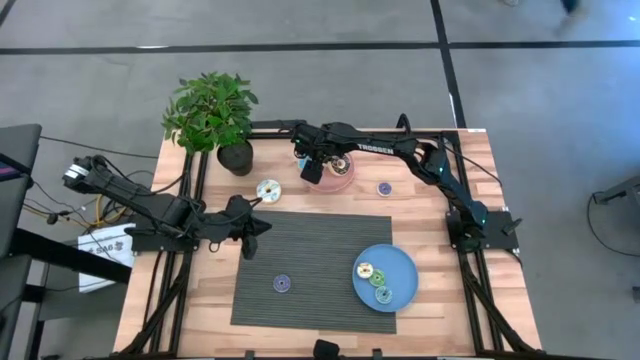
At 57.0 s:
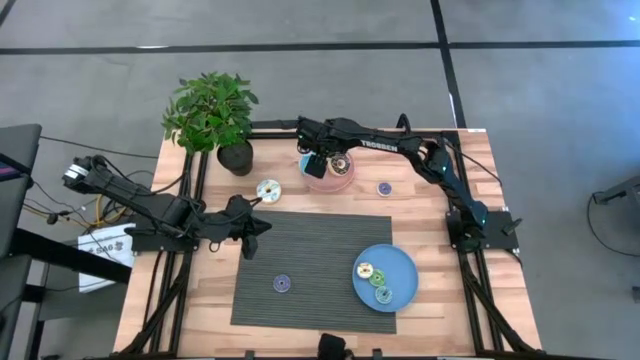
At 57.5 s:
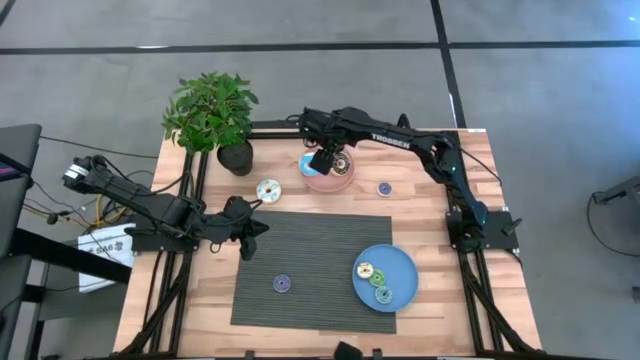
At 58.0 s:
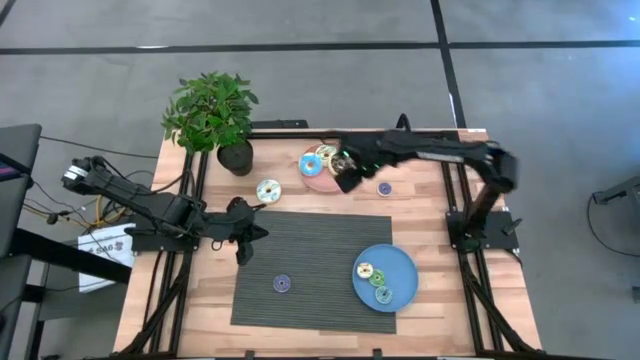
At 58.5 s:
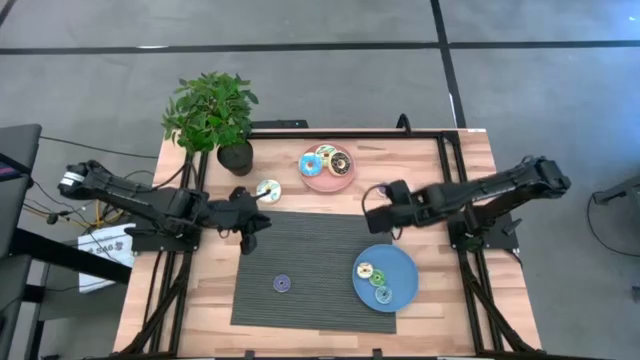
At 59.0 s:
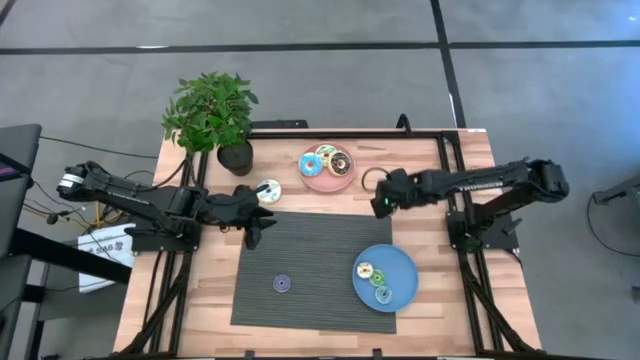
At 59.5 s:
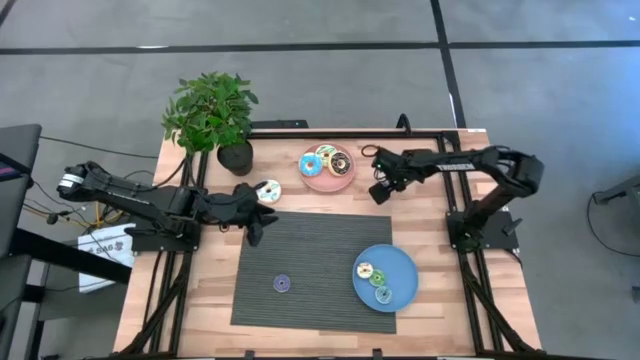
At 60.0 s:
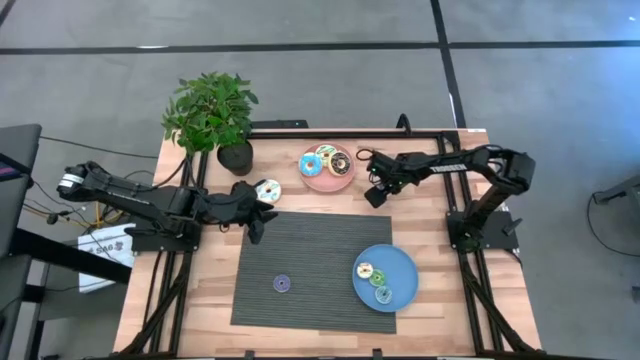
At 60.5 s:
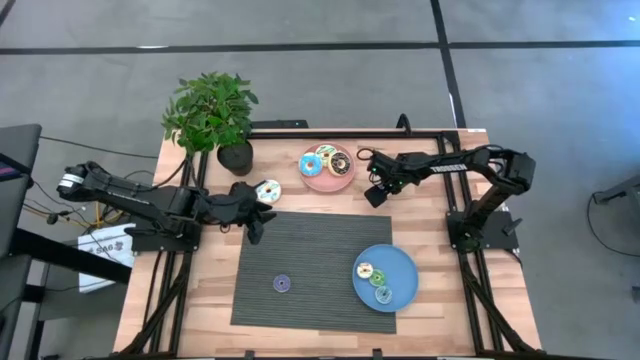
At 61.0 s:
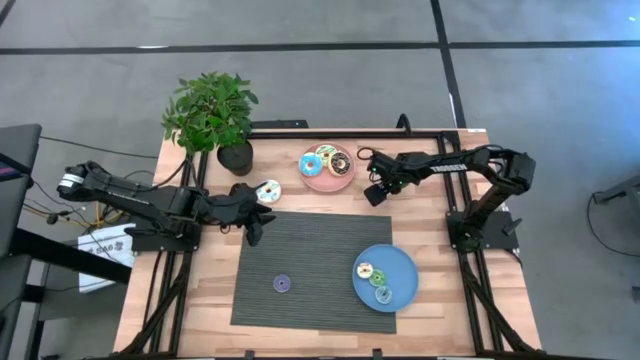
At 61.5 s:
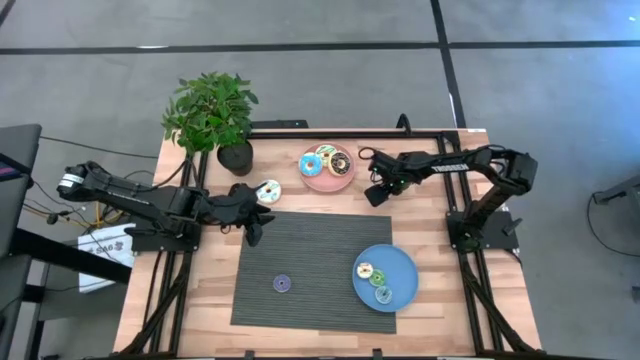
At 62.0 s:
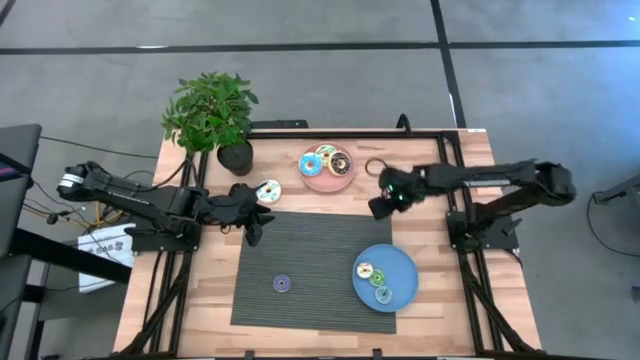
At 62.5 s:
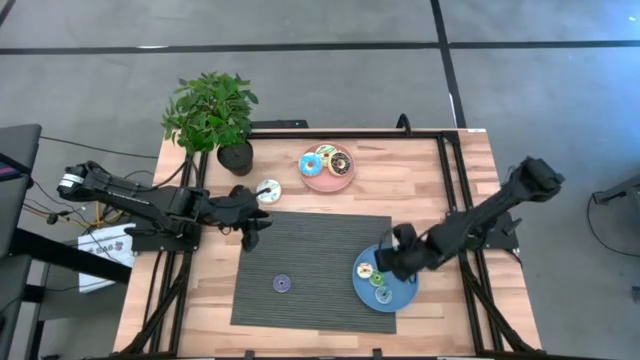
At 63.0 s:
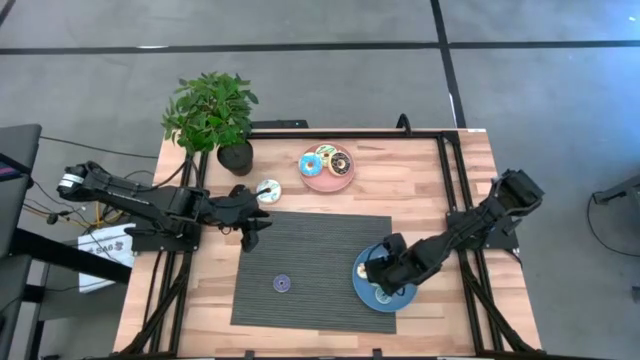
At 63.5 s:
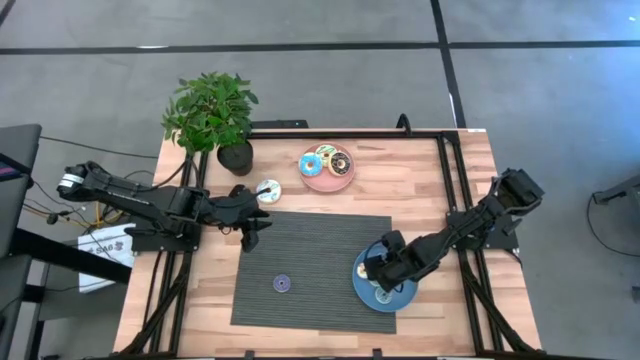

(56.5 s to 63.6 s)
Task: Pick & Place donuts
Put the top small dark blue donut on the blue plate

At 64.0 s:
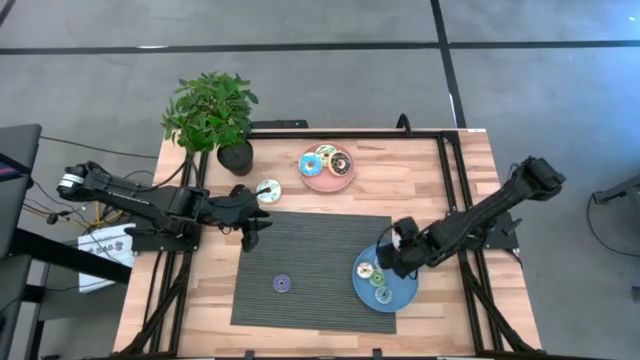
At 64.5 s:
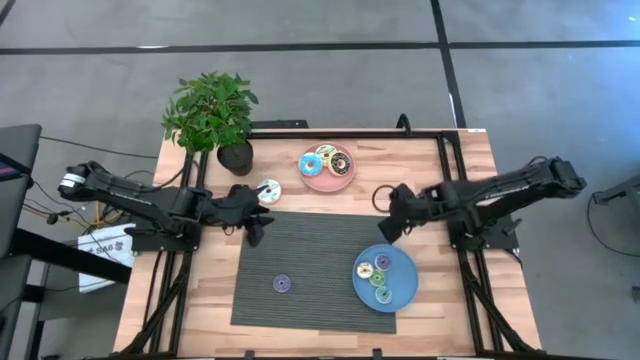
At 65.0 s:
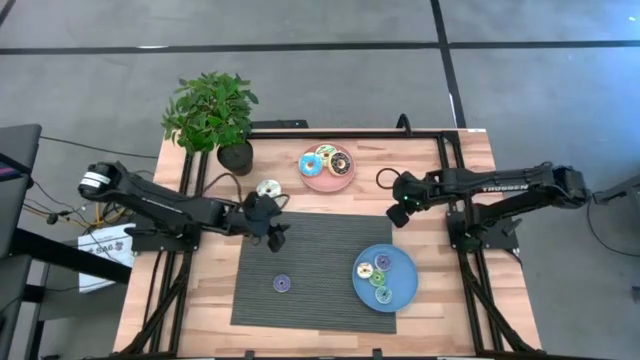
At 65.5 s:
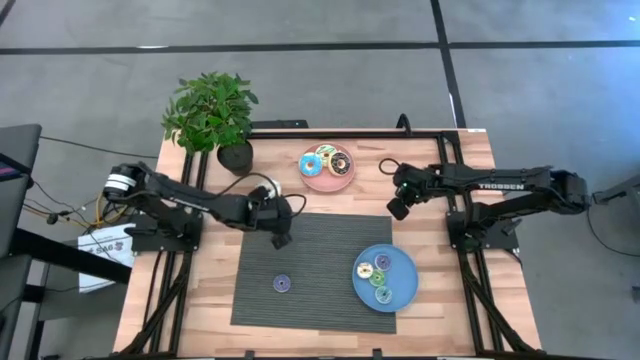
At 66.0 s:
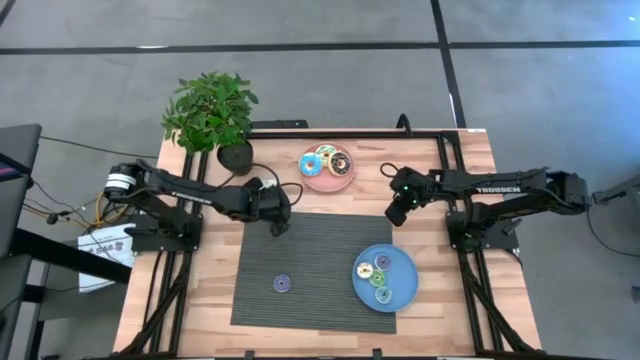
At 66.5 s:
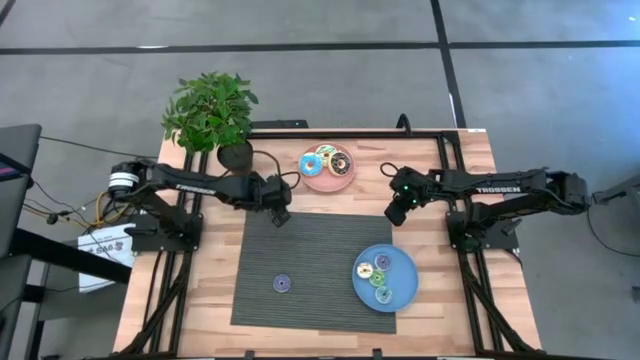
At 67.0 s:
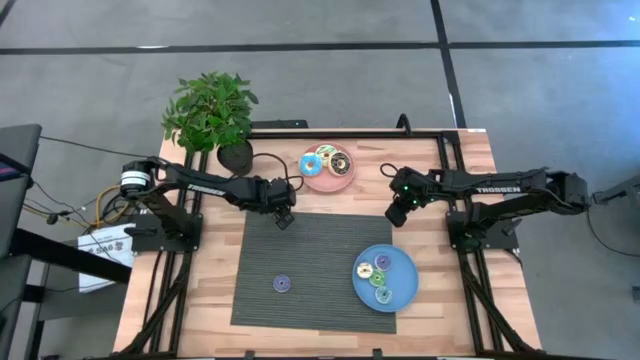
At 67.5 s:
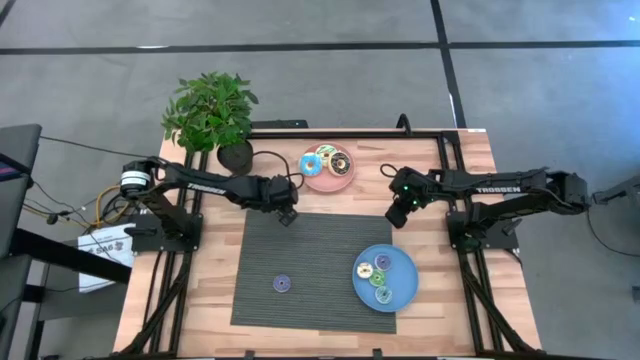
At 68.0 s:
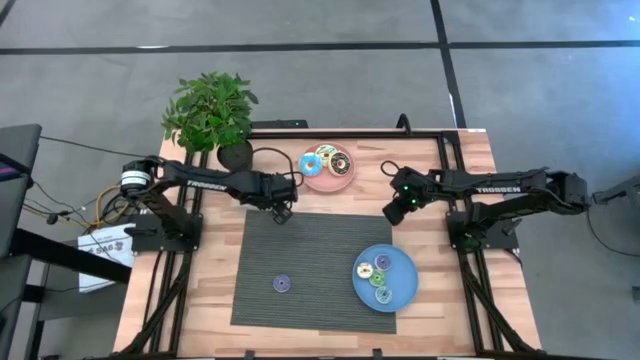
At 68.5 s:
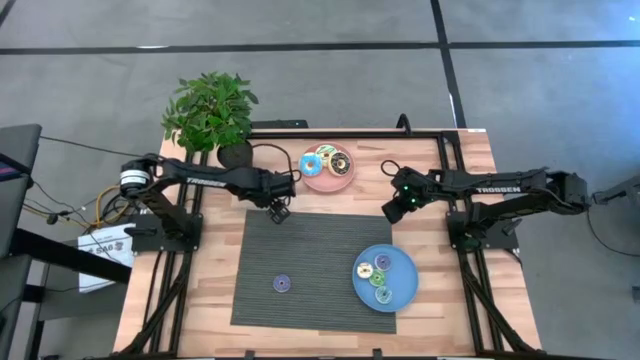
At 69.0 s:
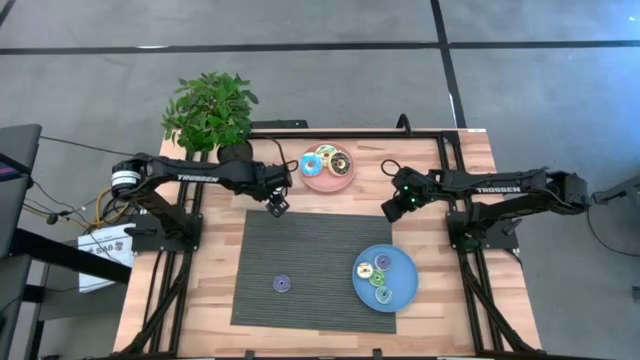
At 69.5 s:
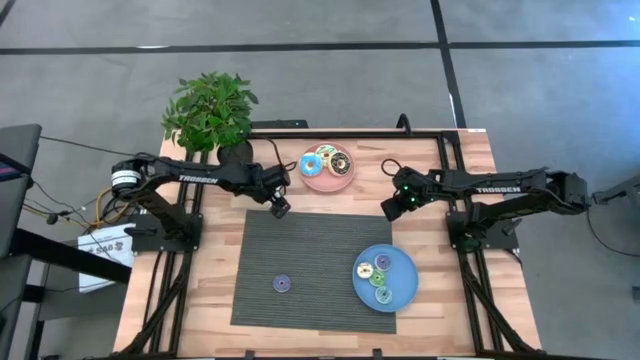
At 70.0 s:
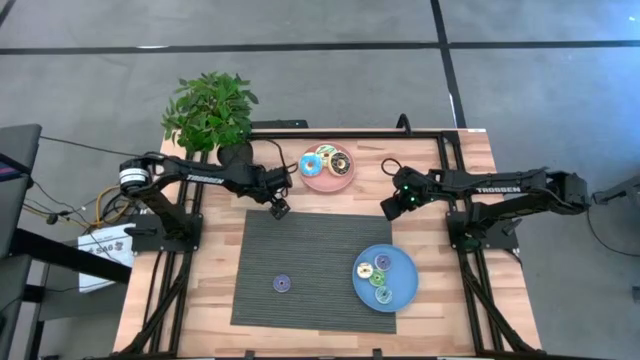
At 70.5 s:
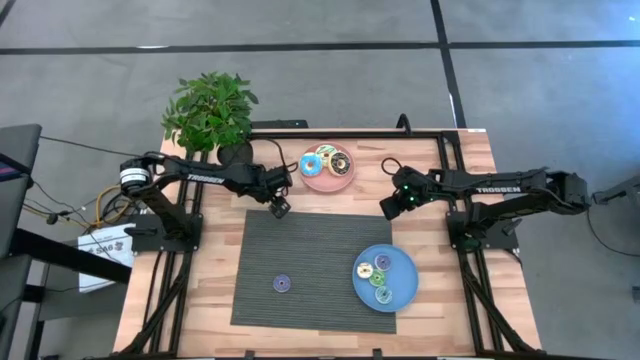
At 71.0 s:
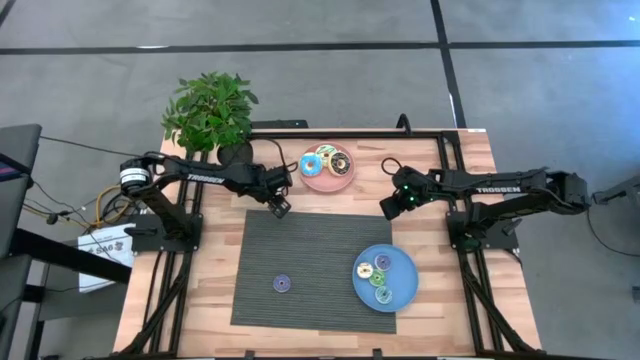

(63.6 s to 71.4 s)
Put the large white donut on the pink plate

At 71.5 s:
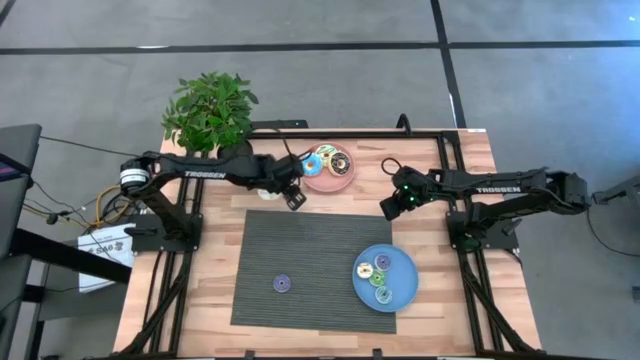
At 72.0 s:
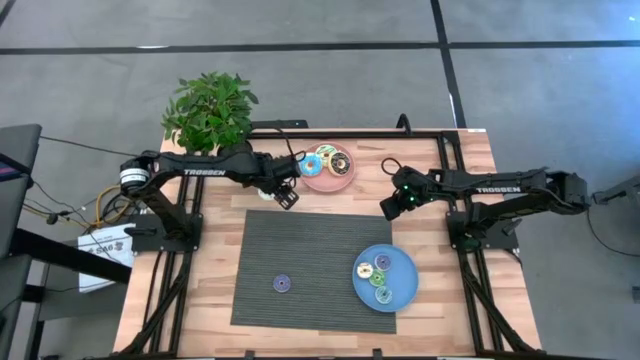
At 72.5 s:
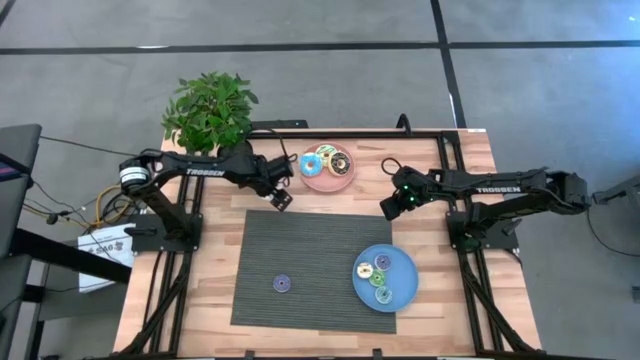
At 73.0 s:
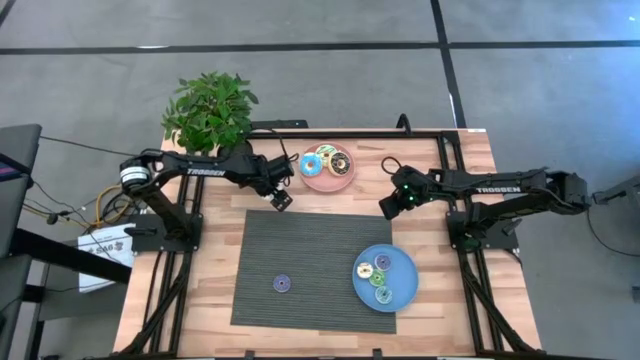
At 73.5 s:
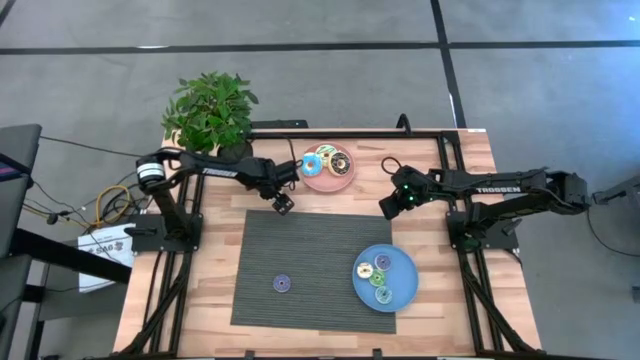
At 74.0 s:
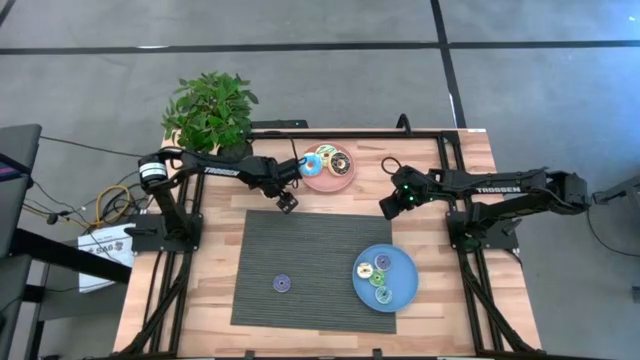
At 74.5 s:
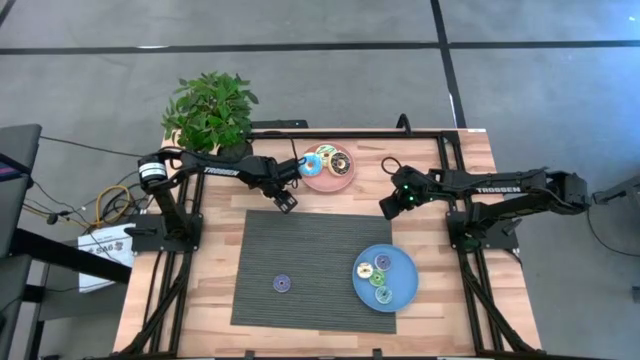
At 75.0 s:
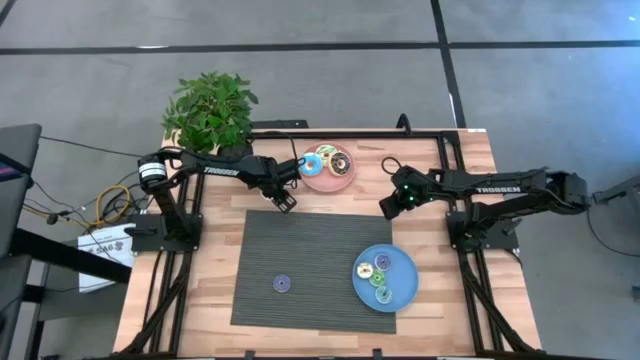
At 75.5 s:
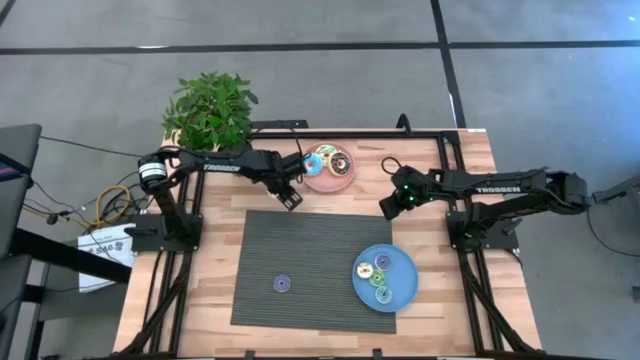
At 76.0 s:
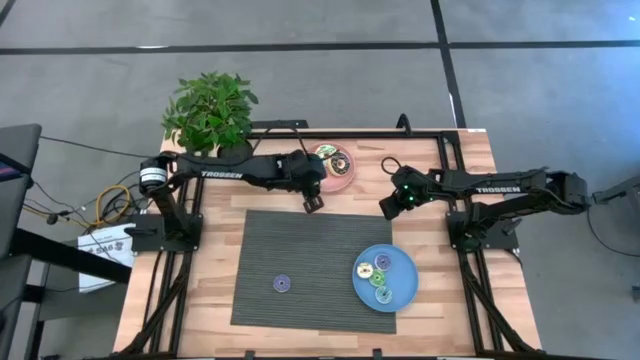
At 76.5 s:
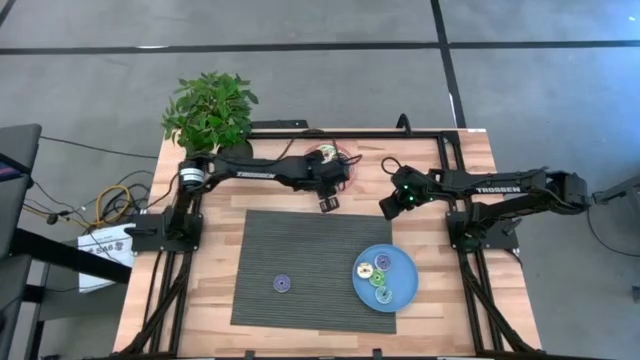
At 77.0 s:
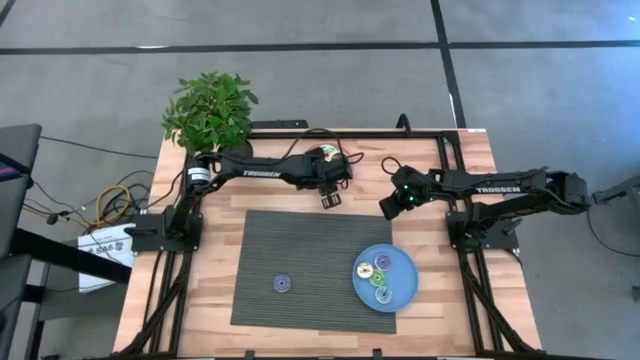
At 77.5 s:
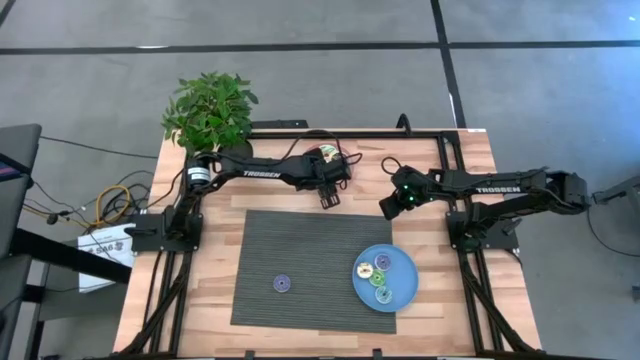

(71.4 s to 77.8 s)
Put the large white donut on the pink plate
